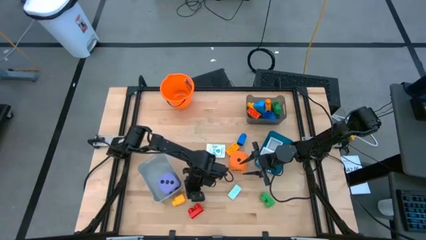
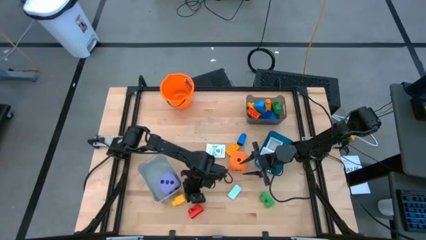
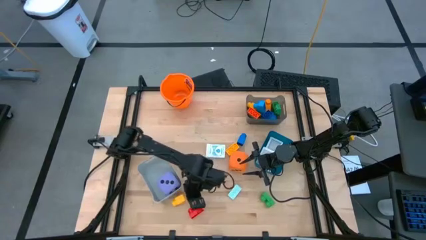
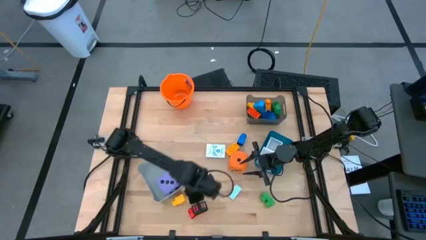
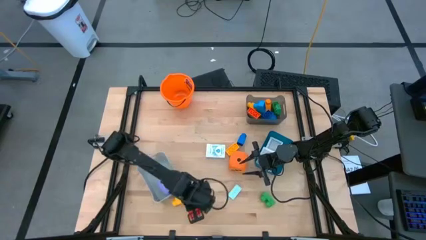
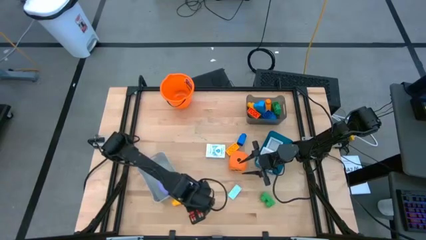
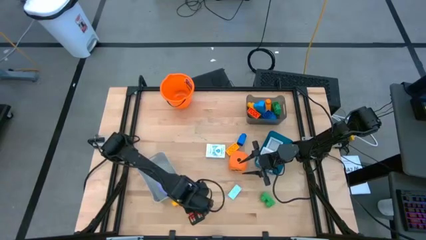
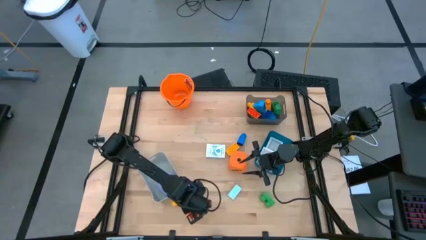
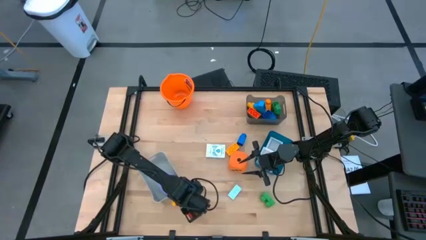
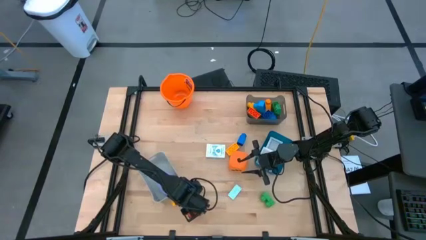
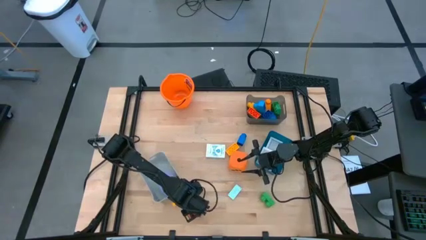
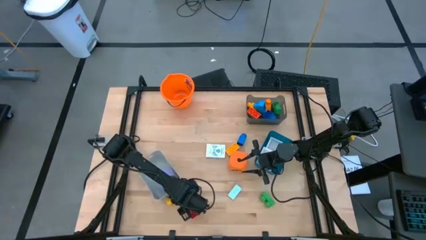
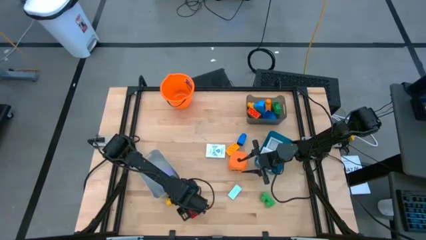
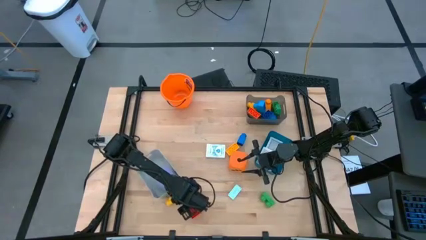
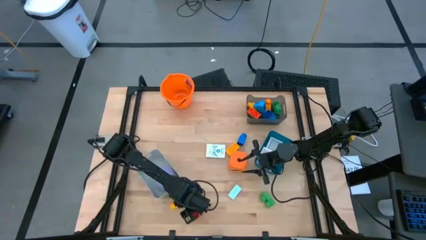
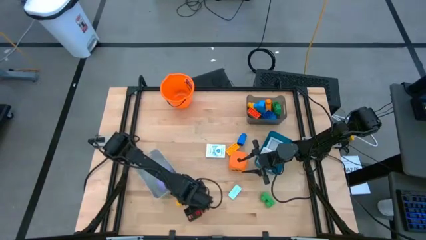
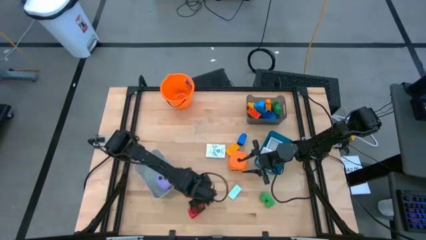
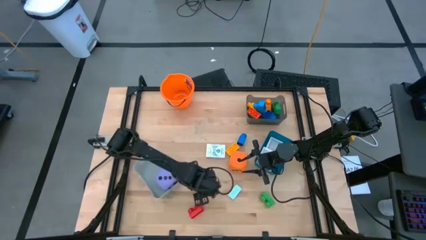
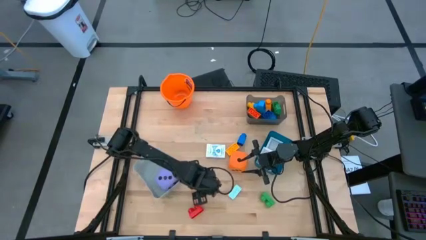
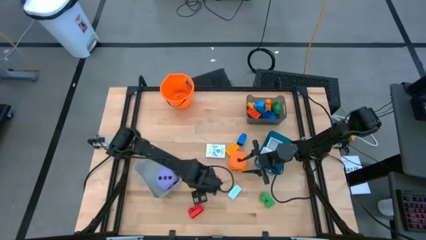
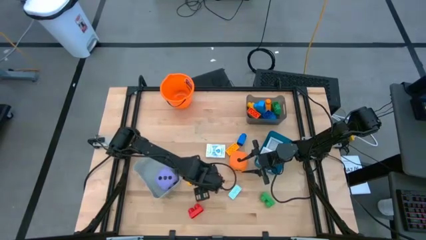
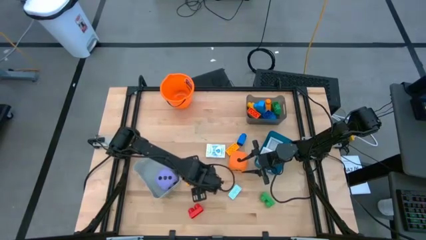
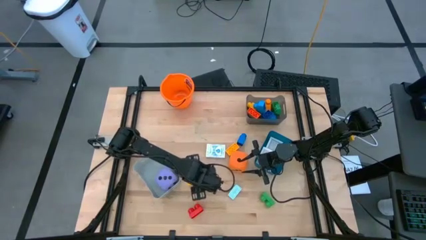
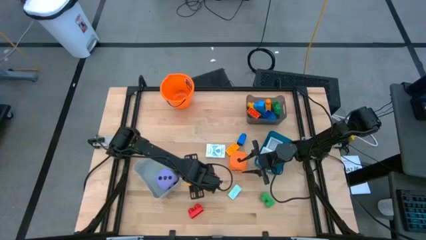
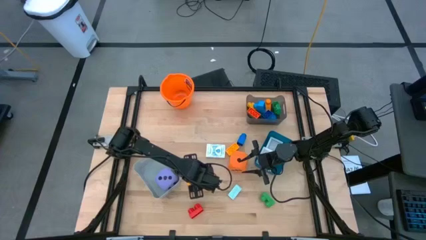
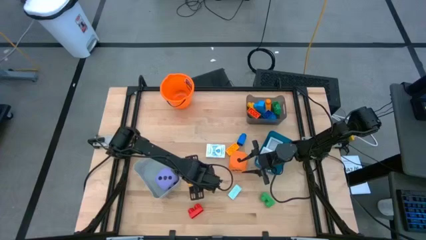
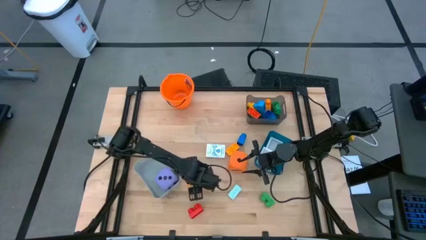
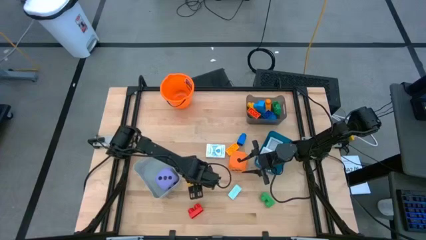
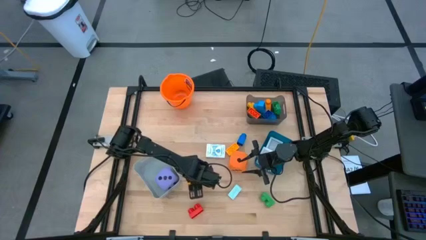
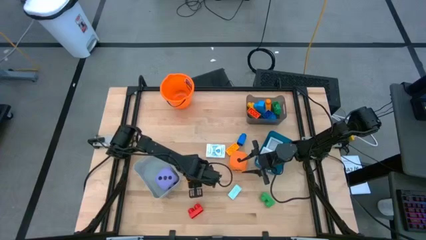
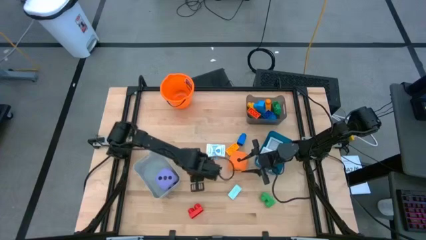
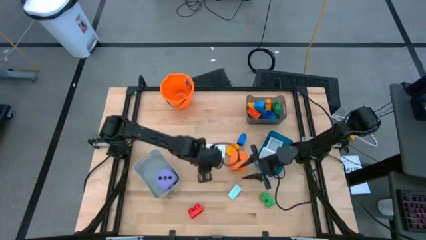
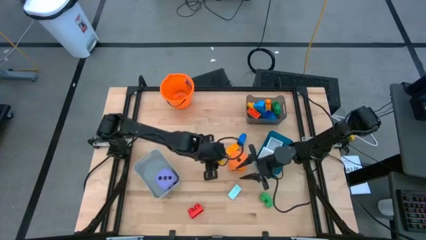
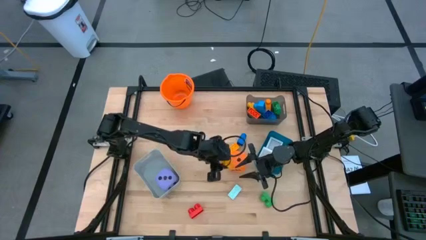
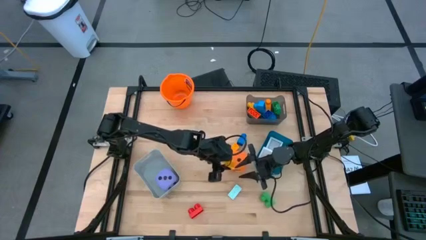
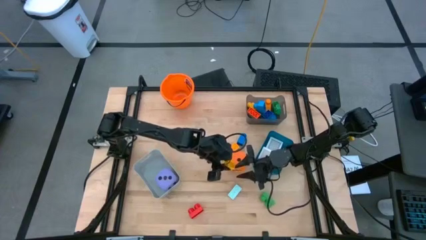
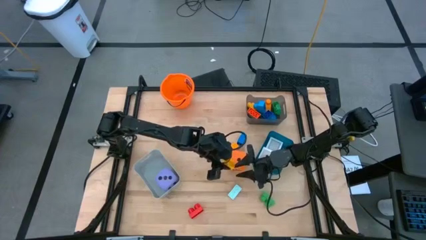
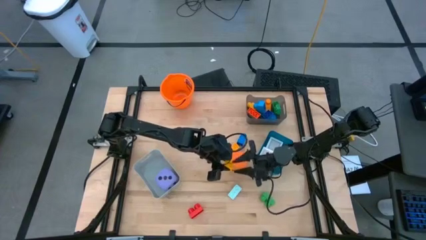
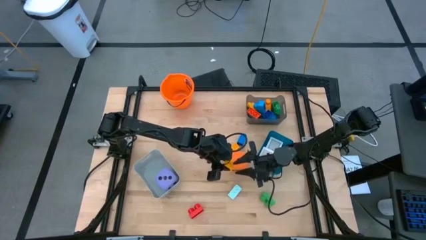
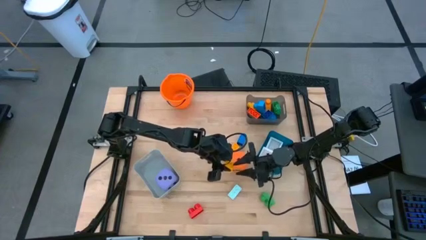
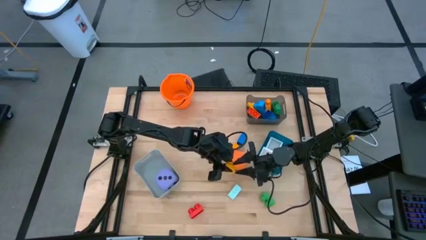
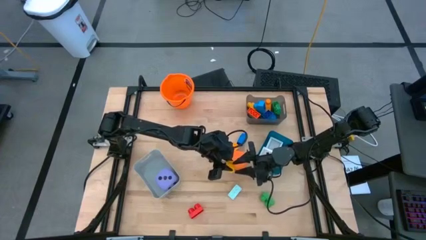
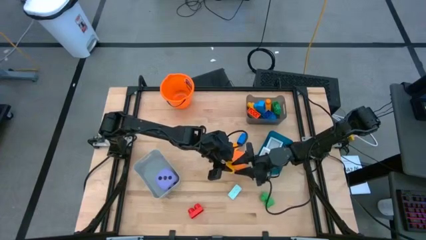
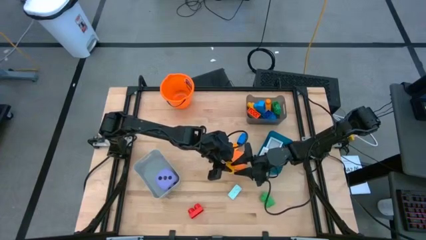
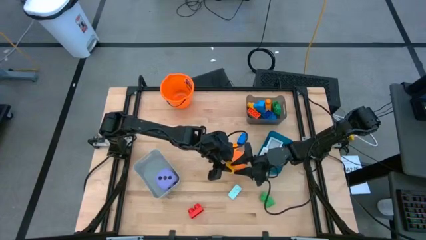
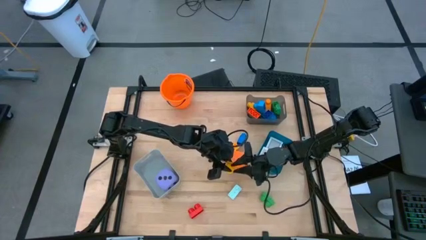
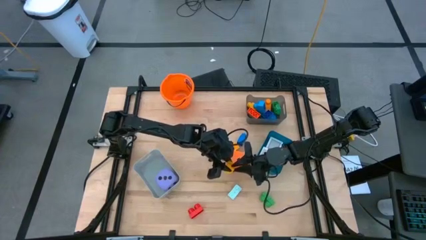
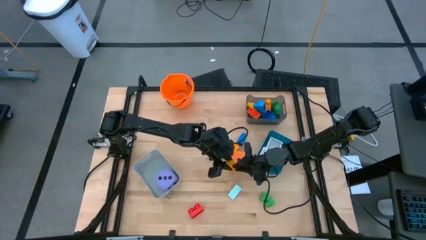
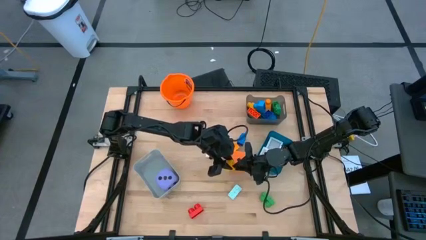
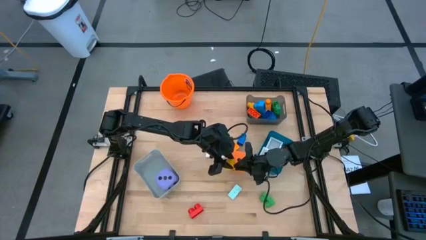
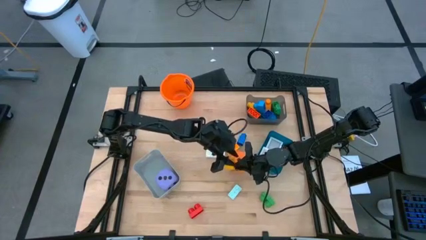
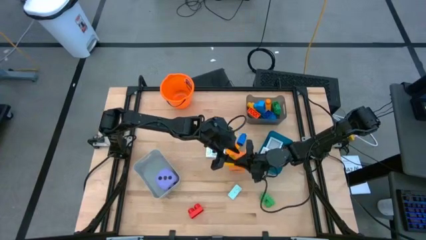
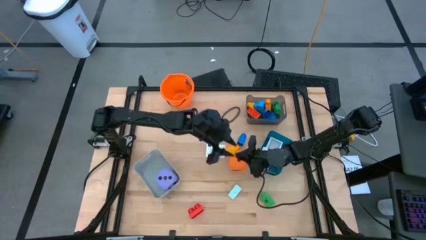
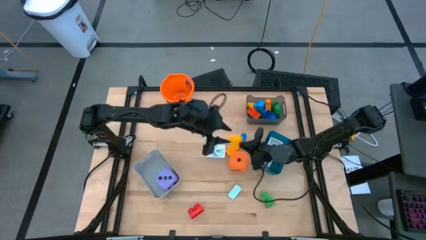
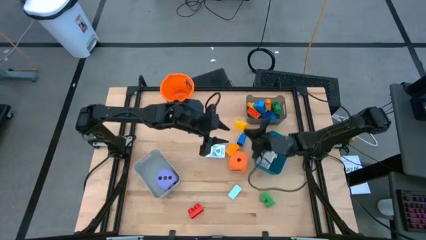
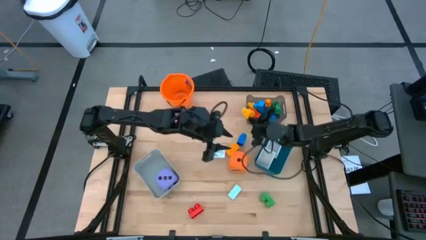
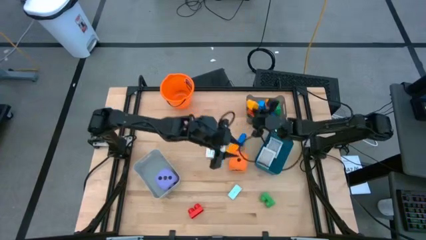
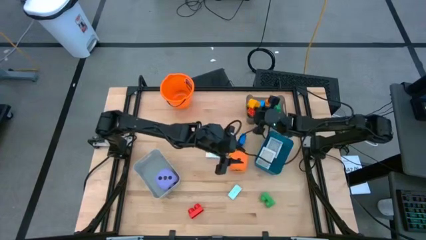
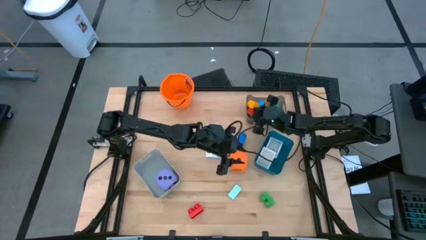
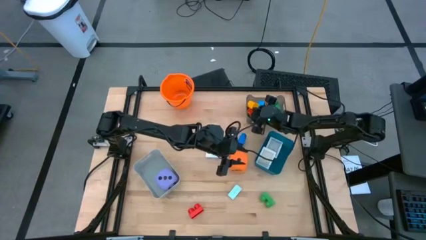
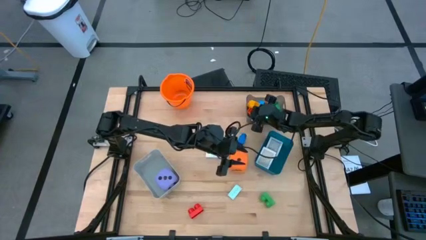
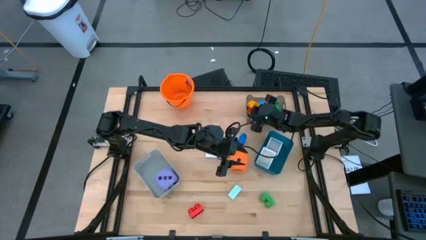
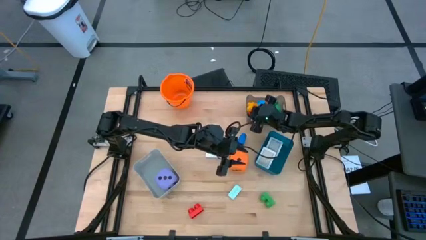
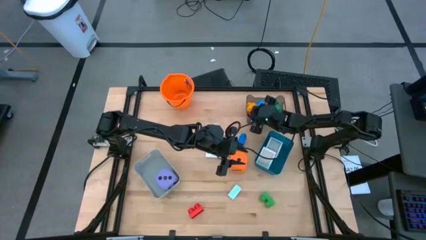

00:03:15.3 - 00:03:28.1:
Task: Pick & Place Toys
Put the yellow game piece into the black bin
